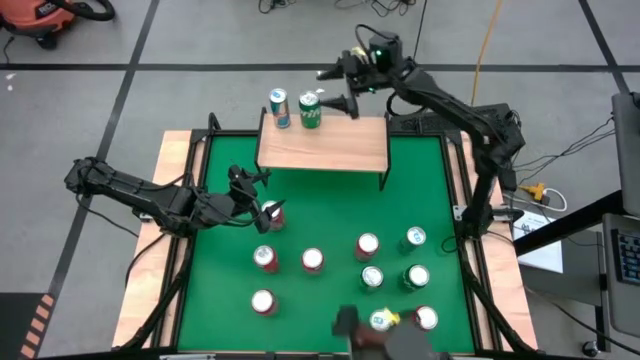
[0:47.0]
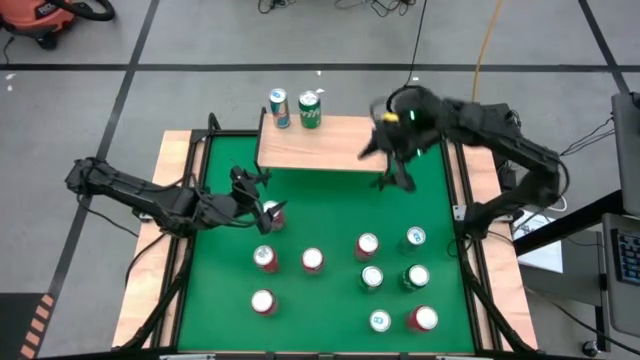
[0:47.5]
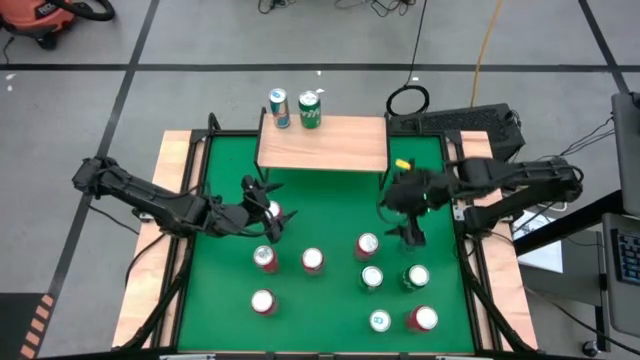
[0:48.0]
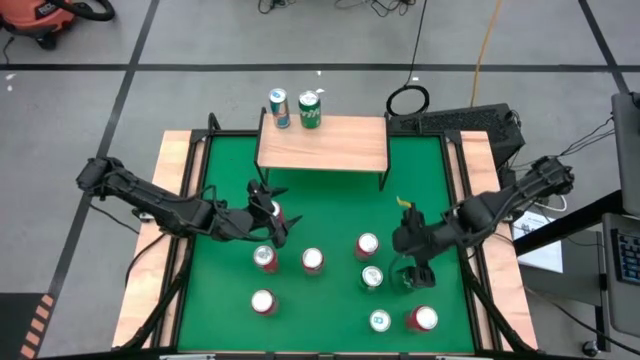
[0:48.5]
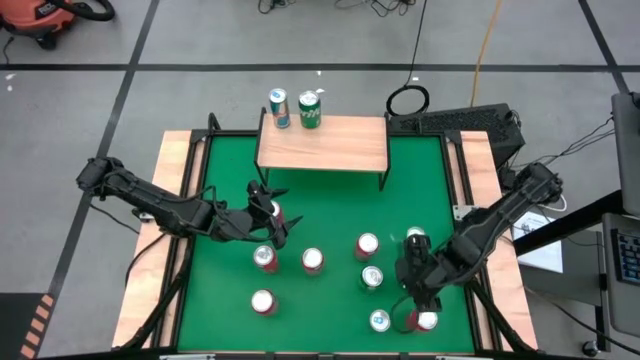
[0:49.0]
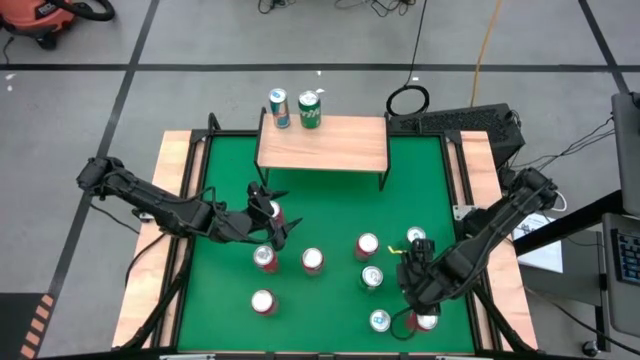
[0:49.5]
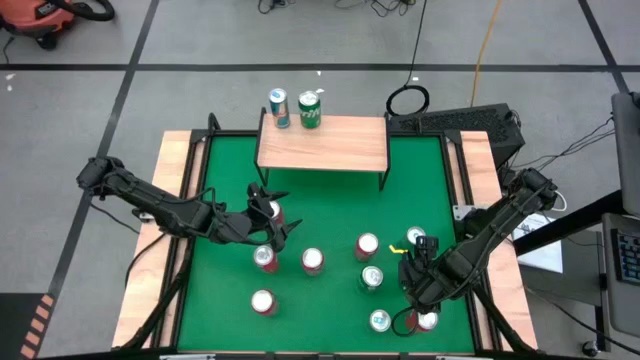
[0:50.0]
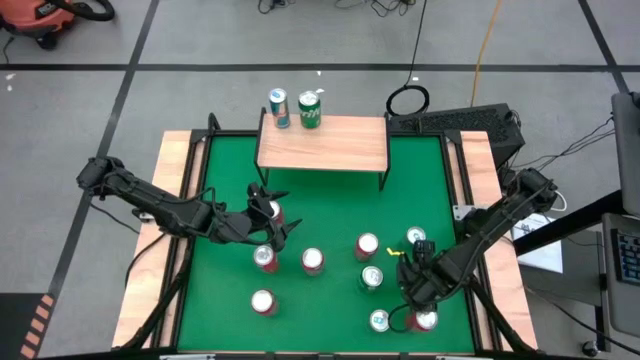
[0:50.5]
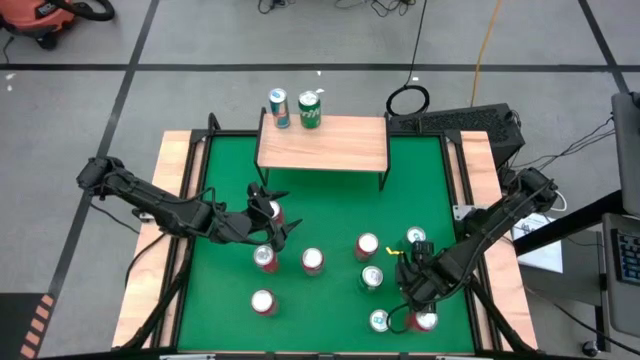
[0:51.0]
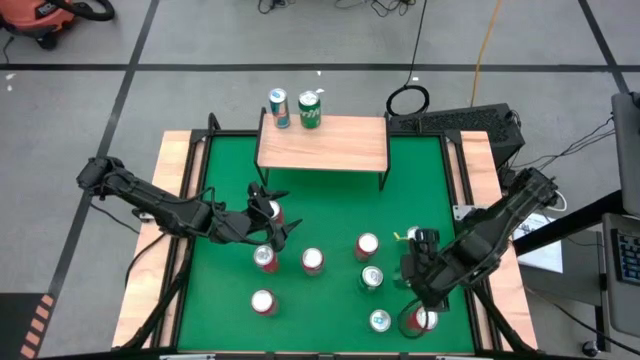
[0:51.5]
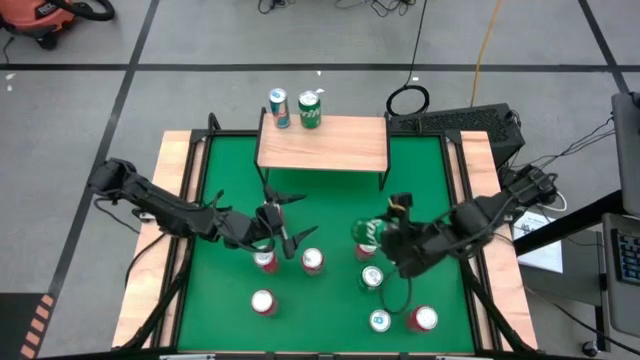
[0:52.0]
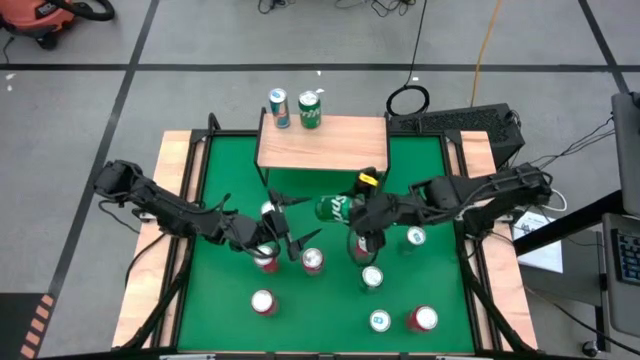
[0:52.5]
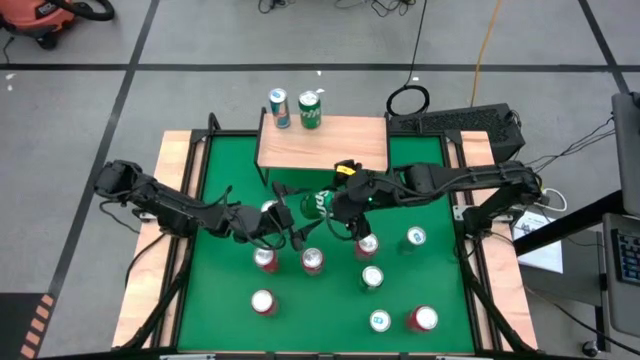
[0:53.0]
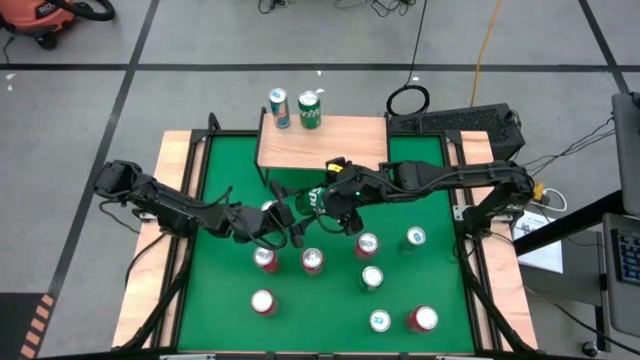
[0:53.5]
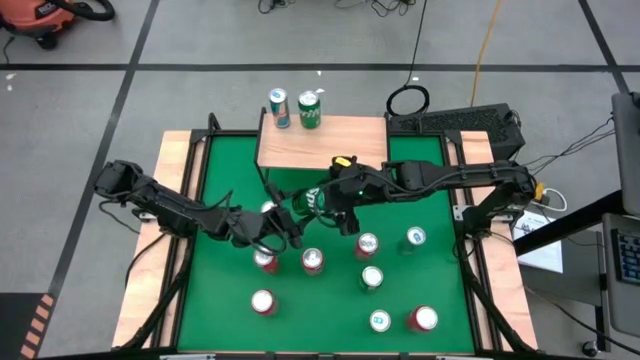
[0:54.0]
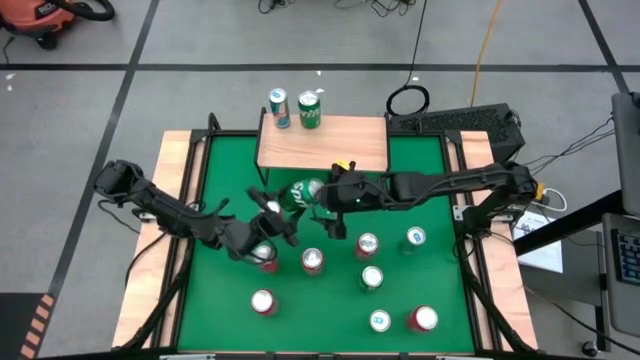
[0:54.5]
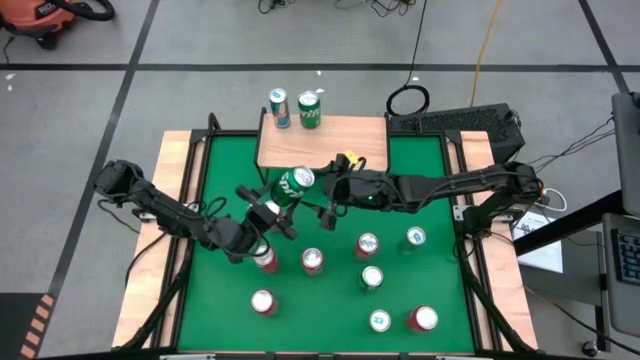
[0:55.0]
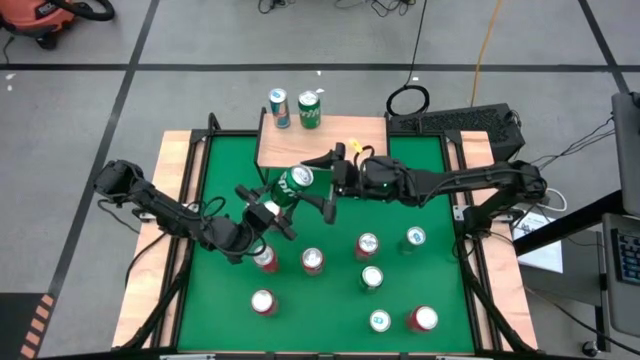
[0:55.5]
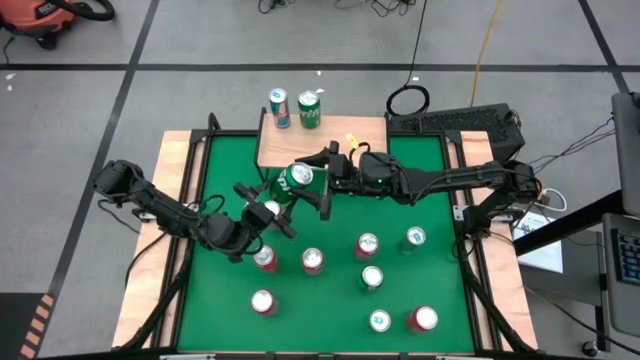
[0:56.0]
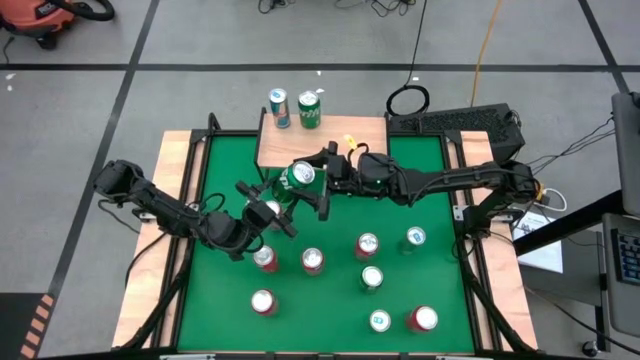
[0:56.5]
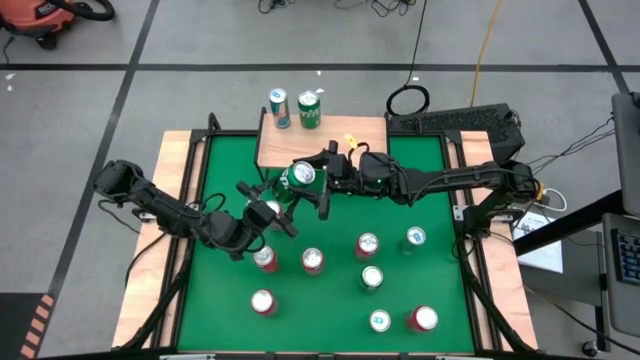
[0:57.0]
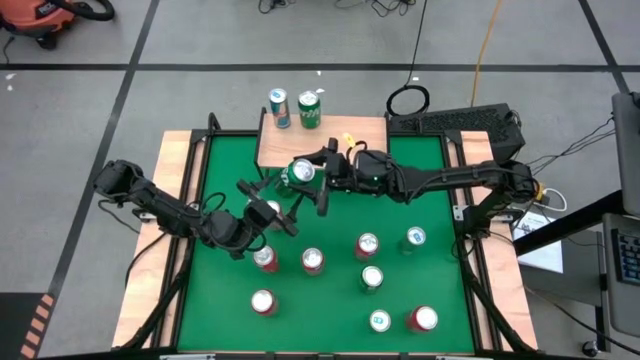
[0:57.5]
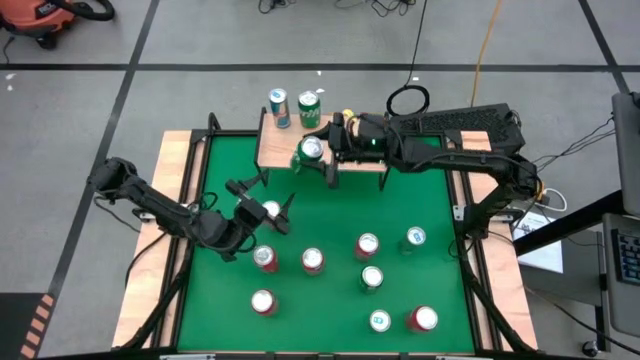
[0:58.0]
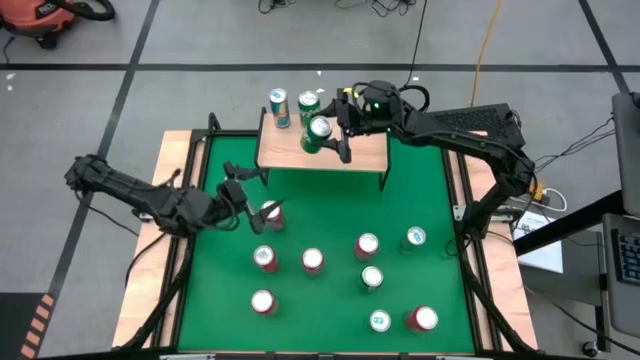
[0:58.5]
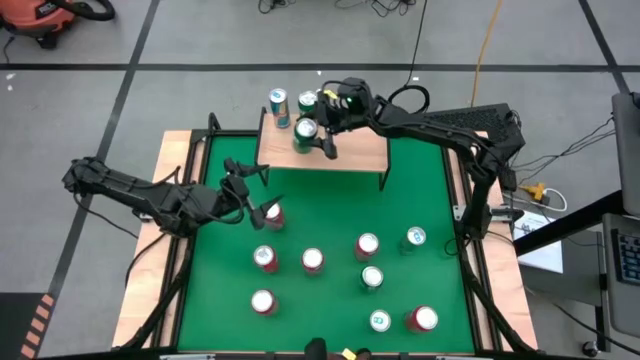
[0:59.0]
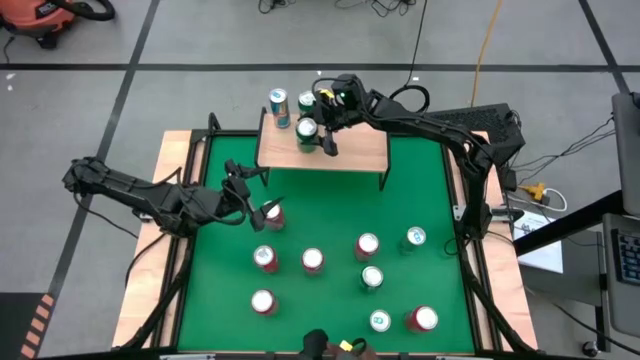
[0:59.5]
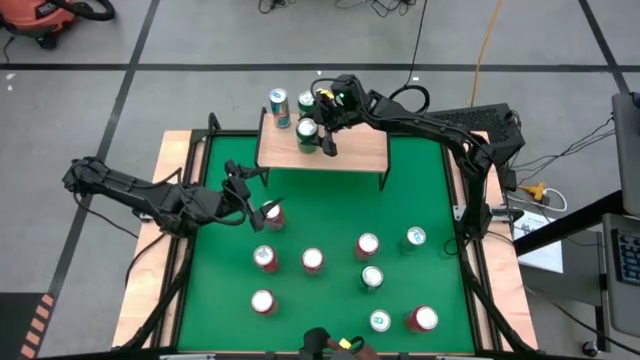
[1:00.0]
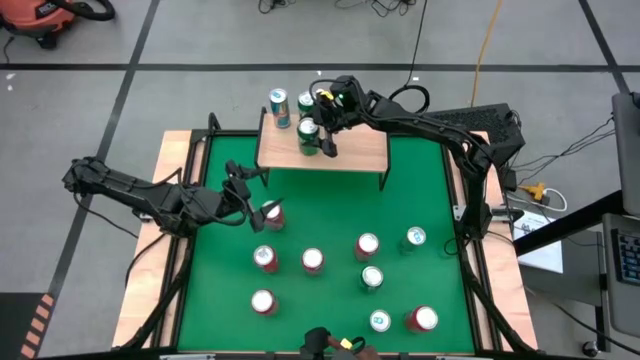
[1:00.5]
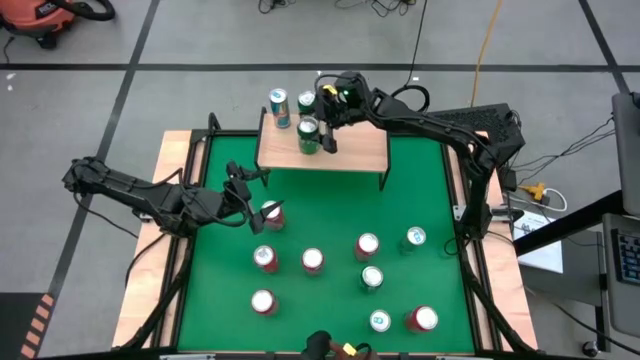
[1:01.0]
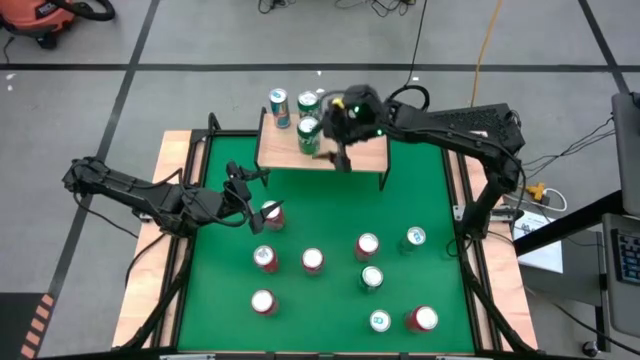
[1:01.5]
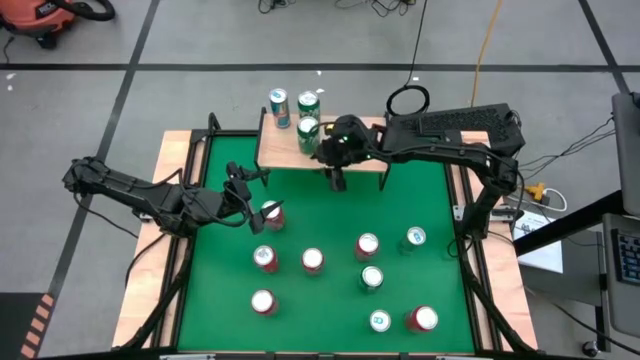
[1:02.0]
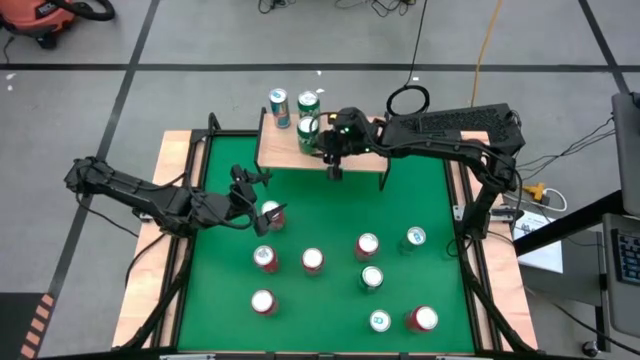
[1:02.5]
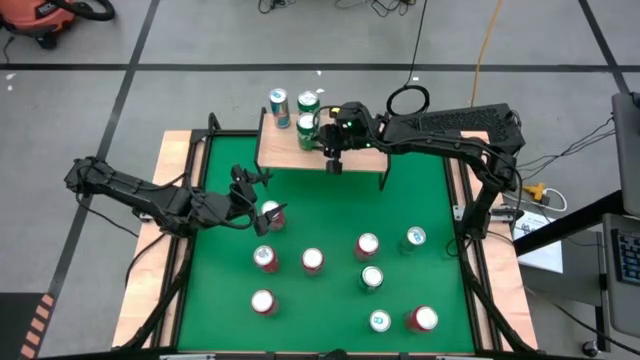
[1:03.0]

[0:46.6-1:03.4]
Task: Place canned beverage on shelf
Put the green soda can on the shelf aligned with the other green soda can

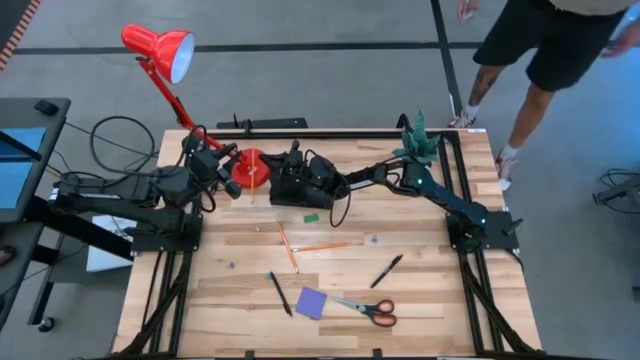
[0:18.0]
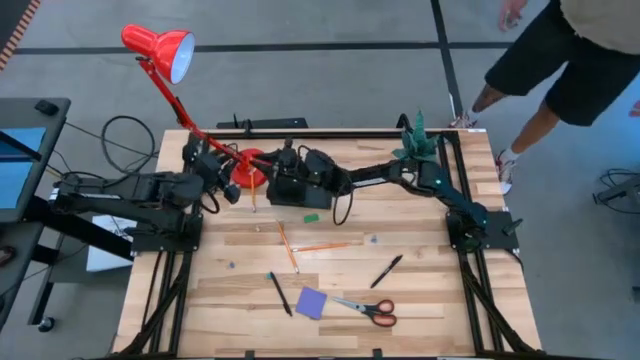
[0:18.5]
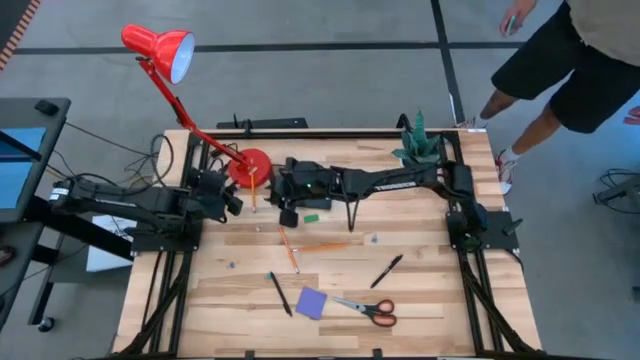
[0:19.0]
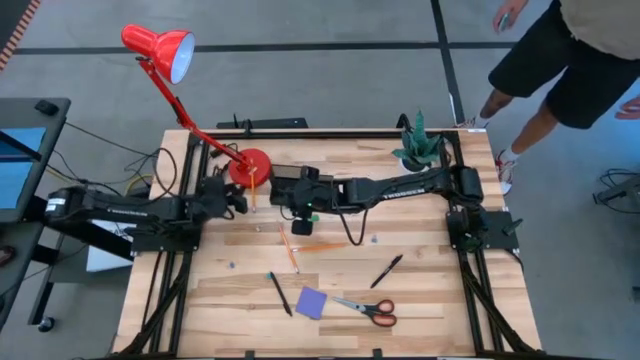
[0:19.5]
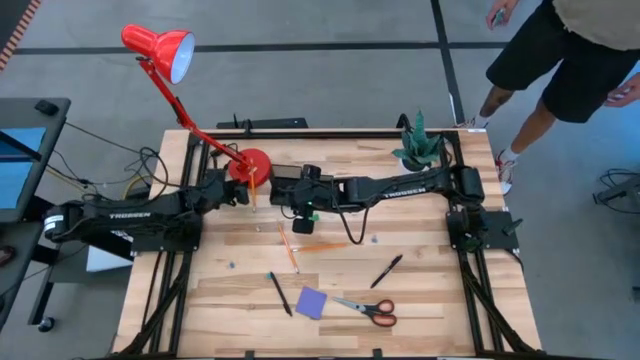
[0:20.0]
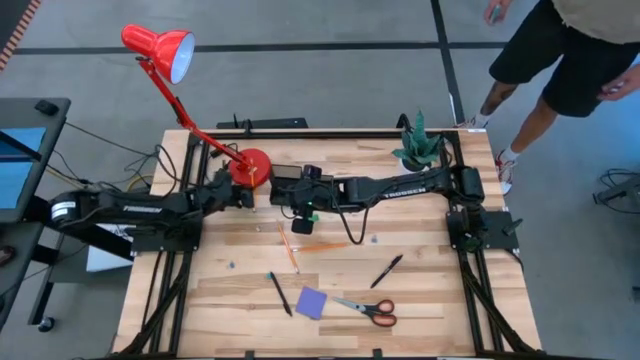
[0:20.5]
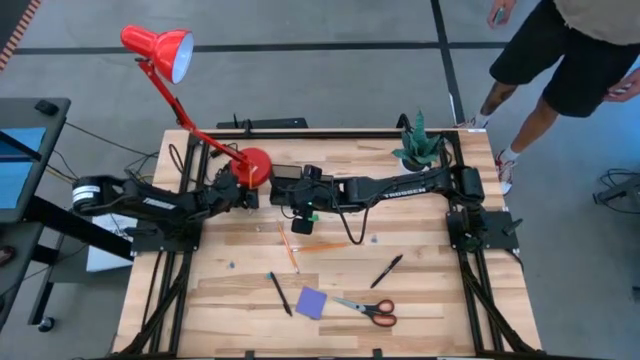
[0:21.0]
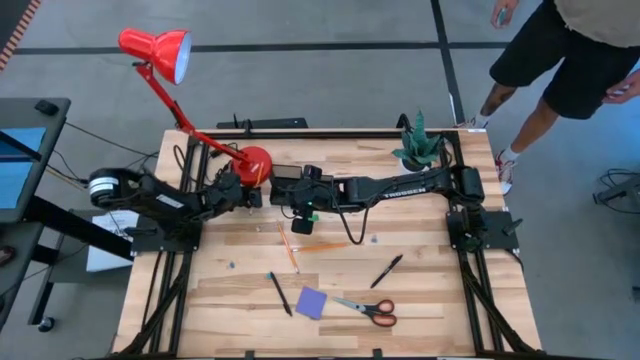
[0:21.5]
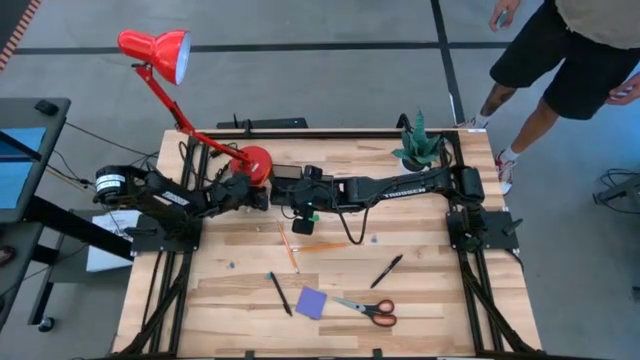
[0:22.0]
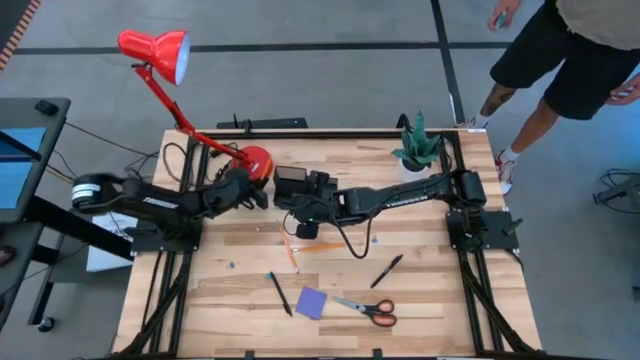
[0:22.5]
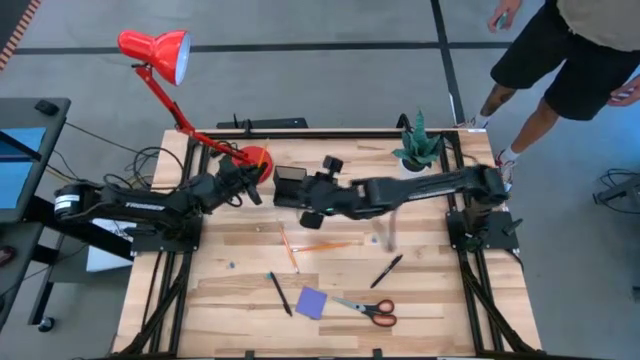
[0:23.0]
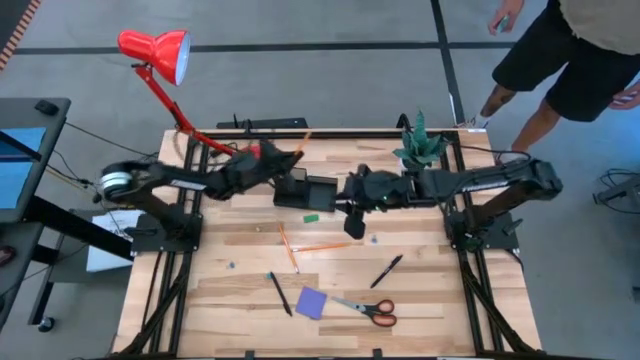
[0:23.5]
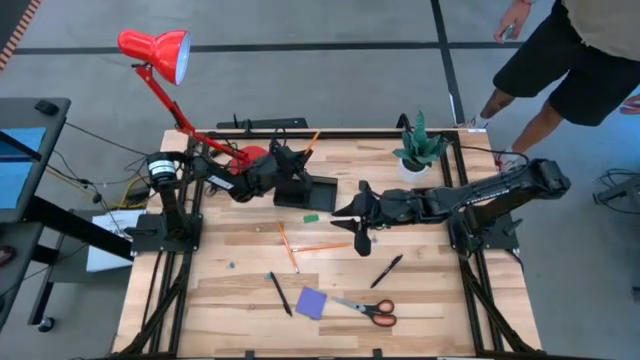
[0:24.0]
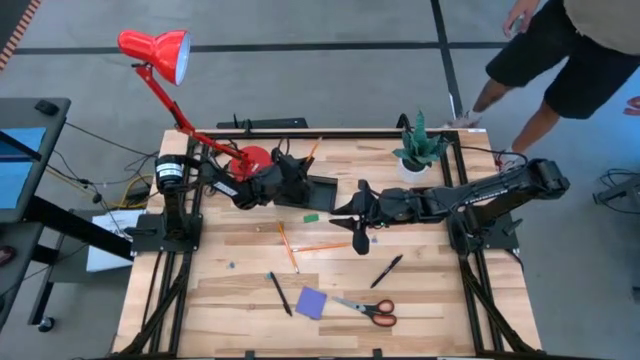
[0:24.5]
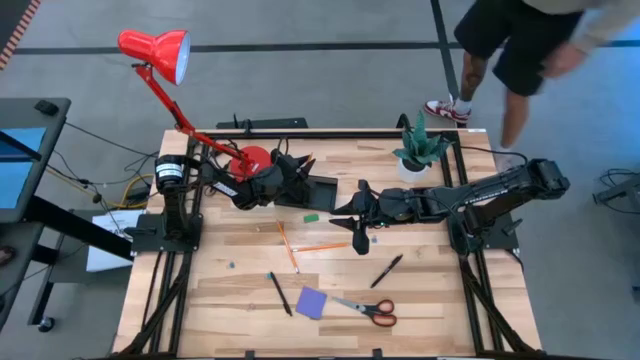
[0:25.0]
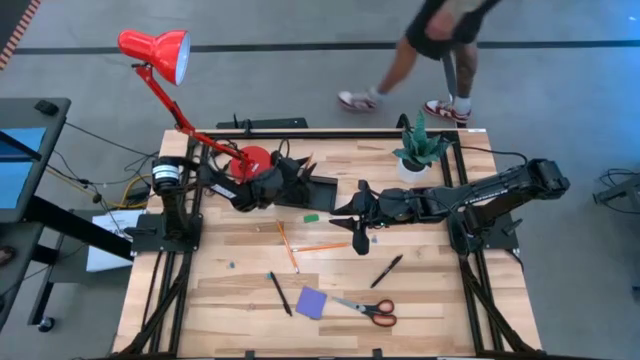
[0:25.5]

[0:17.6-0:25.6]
Task: Pick and place office supplies into organizer
Put the top right yellow pencil into the black desk organizer
